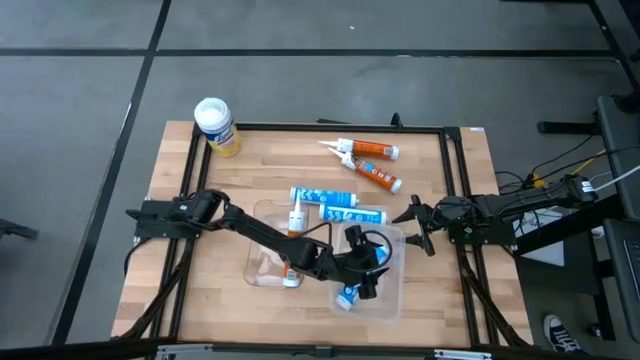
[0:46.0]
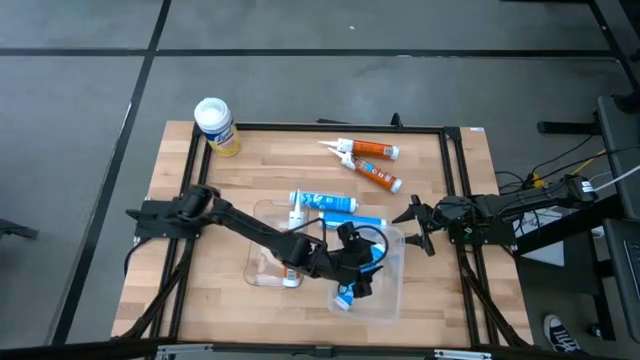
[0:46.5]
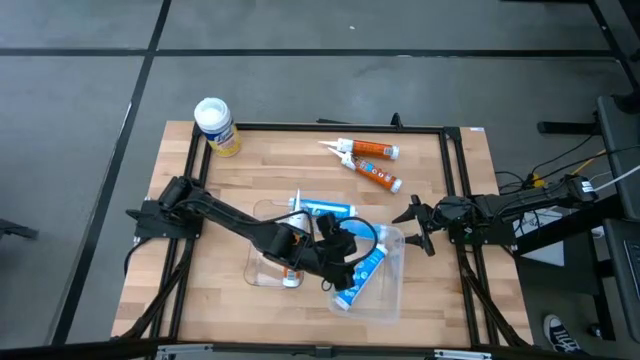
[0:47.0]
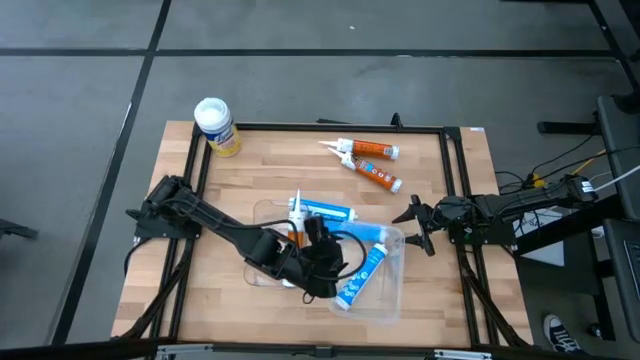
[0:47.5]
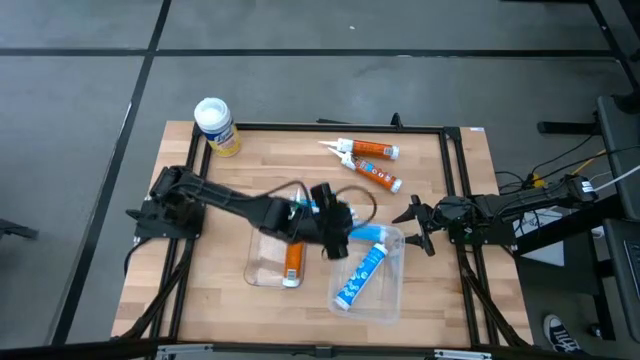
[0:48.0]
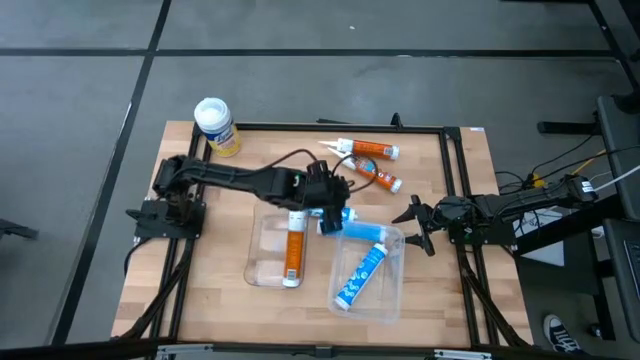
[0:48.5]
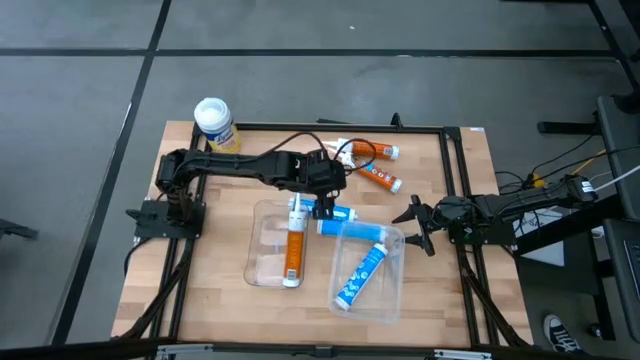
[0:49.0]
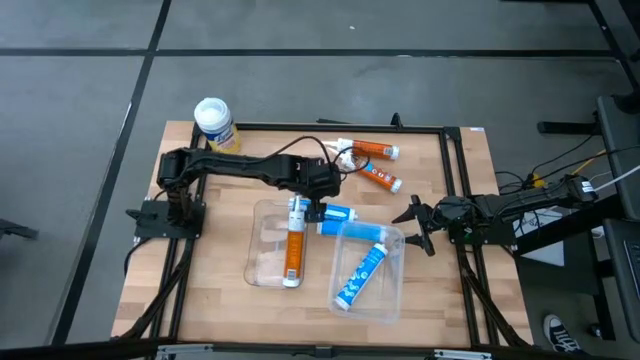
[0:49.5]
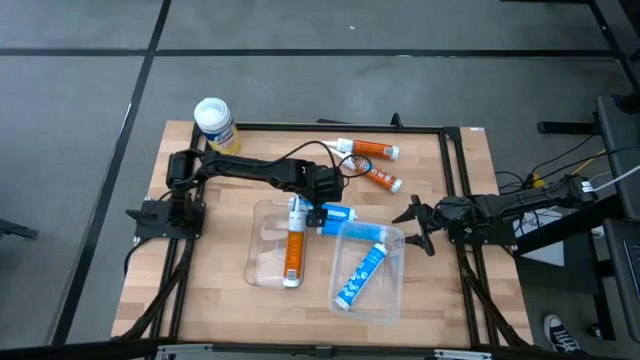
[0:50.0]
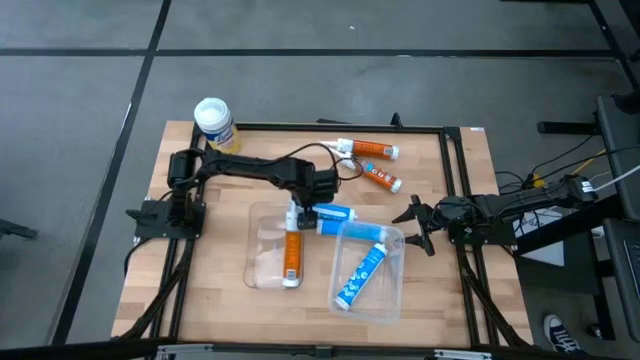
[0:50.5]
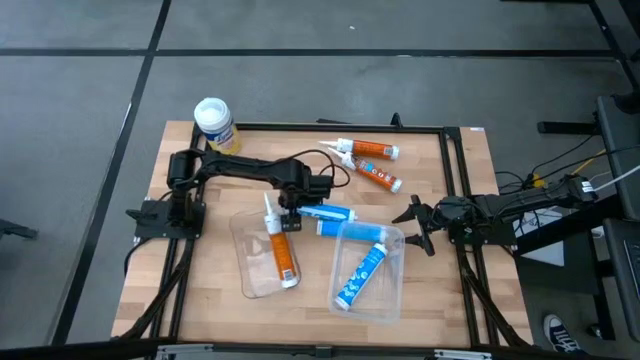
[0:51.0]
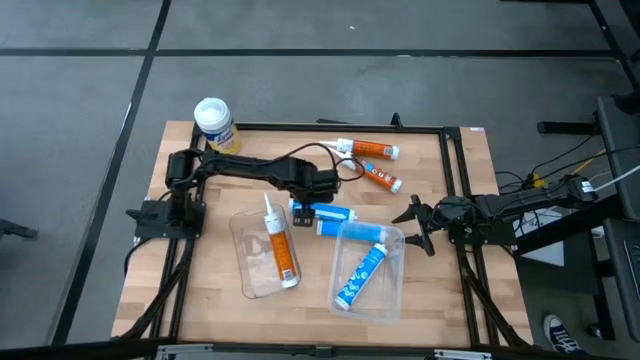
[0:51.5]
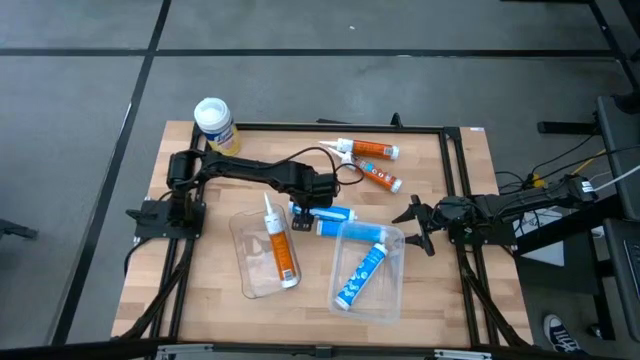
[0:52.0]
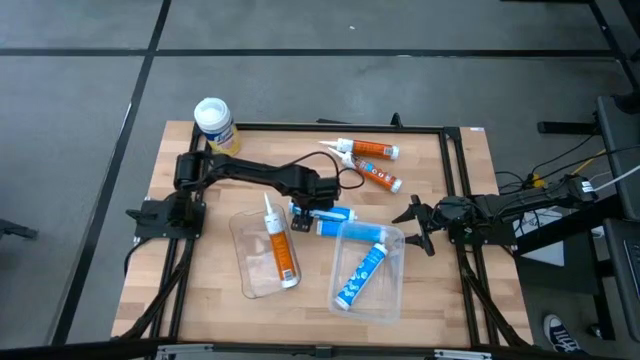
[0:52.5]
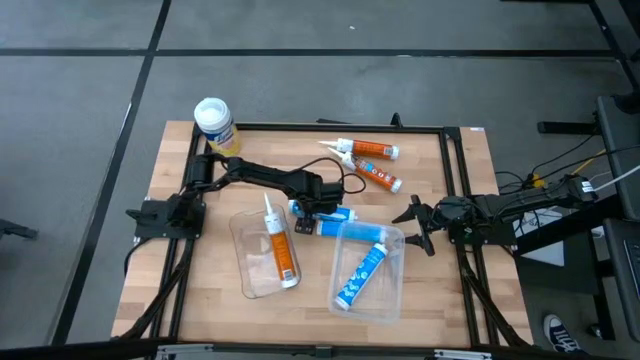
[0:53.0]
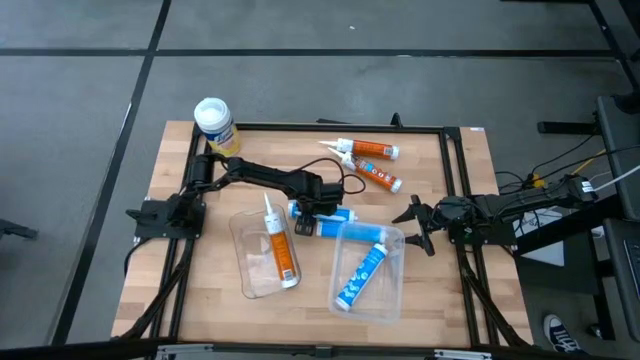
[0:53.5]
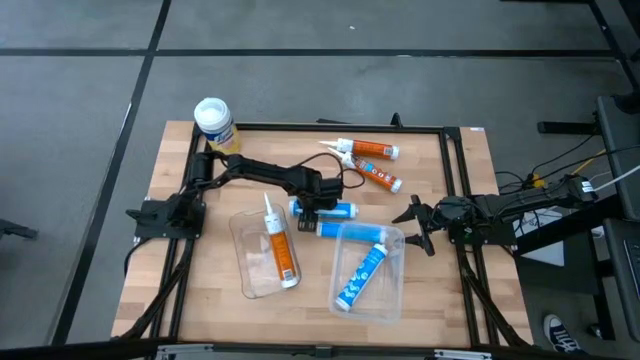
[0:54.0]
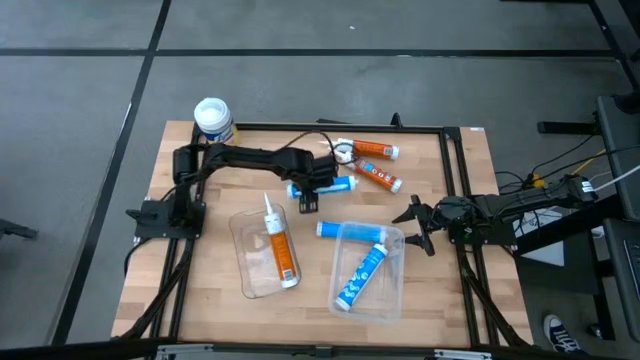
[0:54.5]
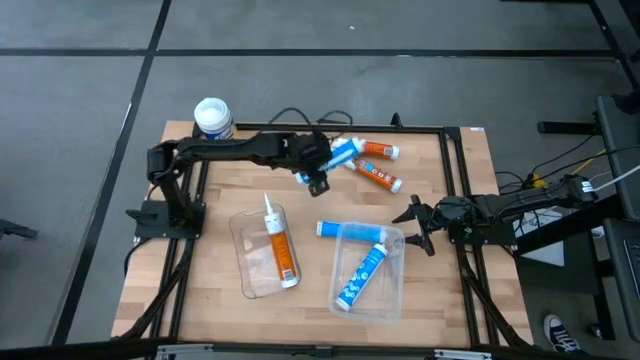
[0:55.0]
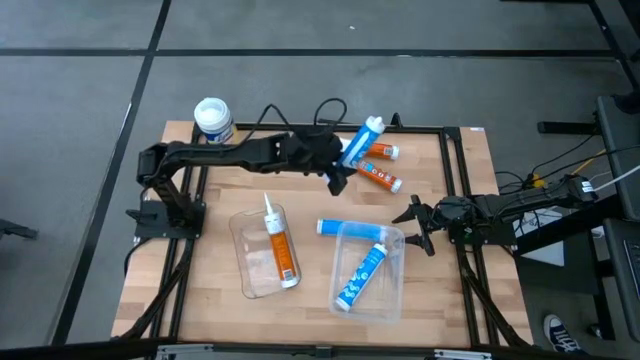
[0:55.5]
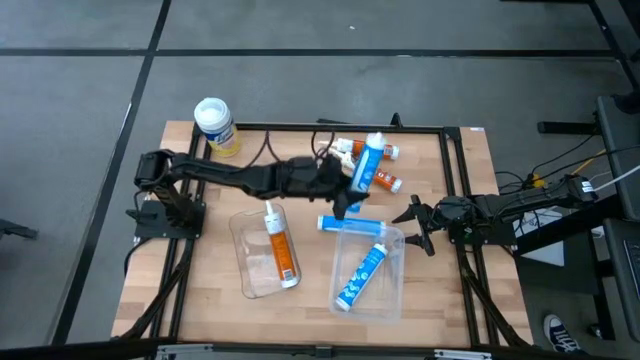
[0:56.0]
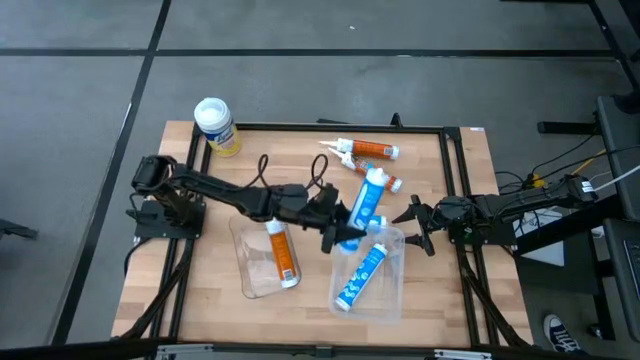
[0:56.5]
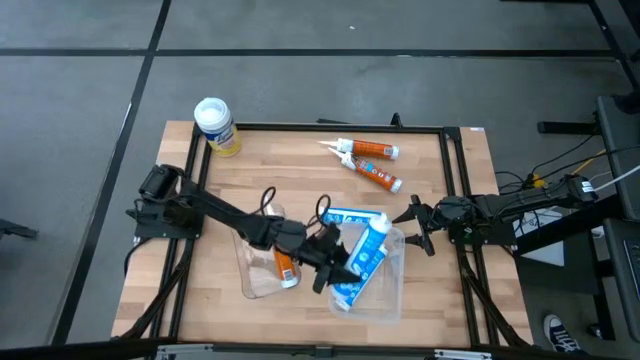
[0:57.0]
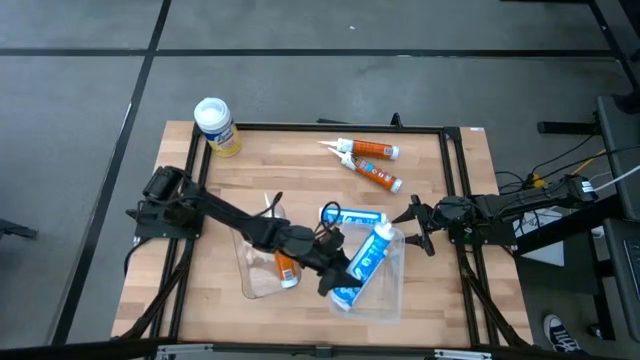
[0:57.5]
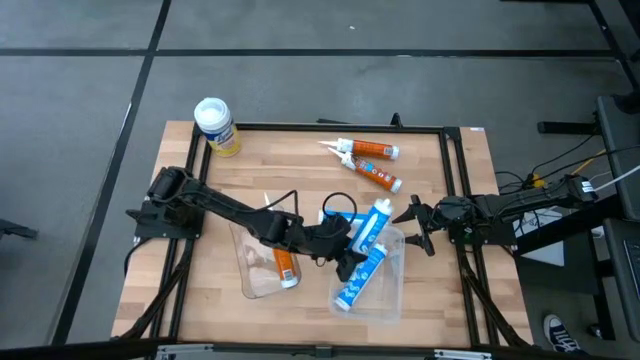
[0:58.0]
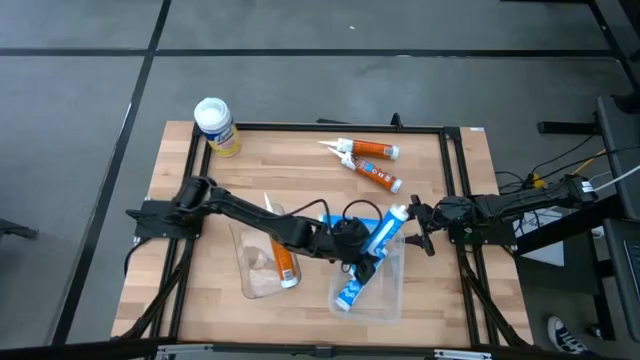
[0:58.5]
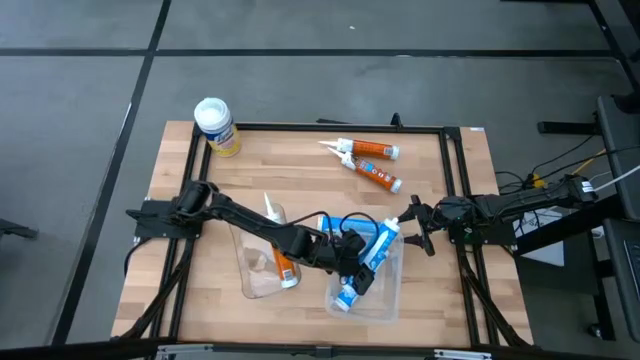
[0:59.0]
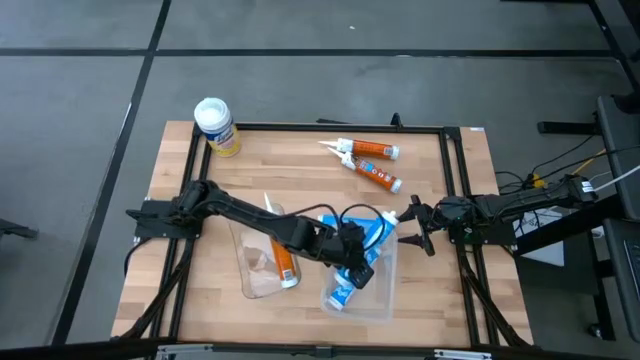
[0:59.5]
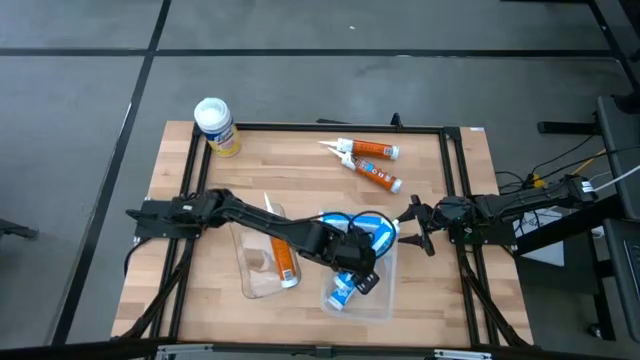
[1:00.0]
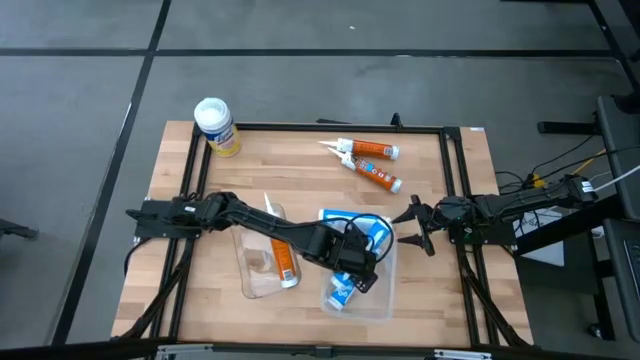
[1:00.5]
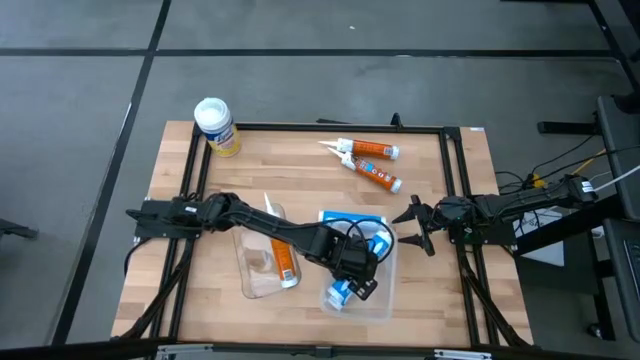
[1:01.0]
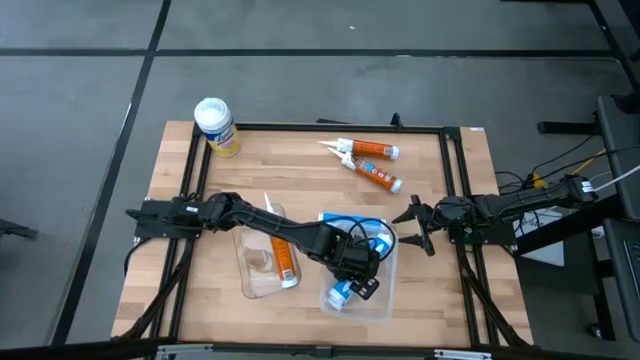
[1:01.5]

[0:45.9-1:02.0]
Task: Pick & place silicon tubes, Sealant and Lysol wipes
Put the top blue sealant into the right transparent bin

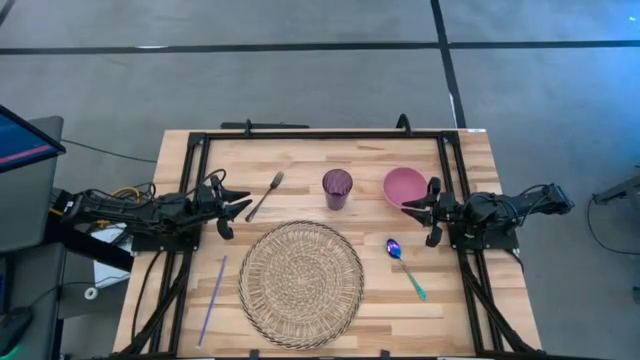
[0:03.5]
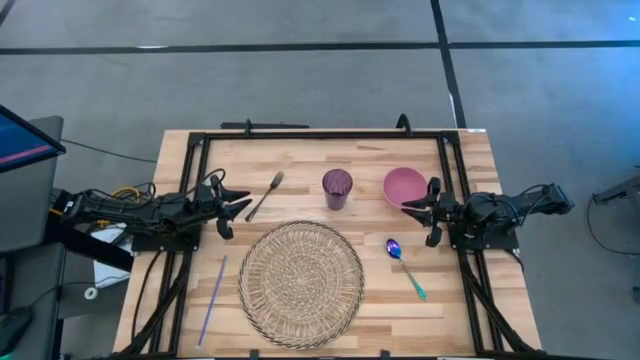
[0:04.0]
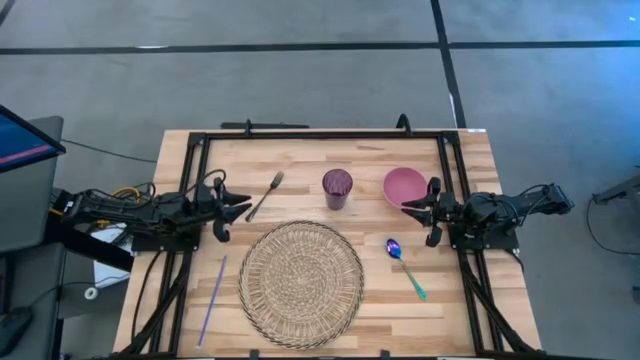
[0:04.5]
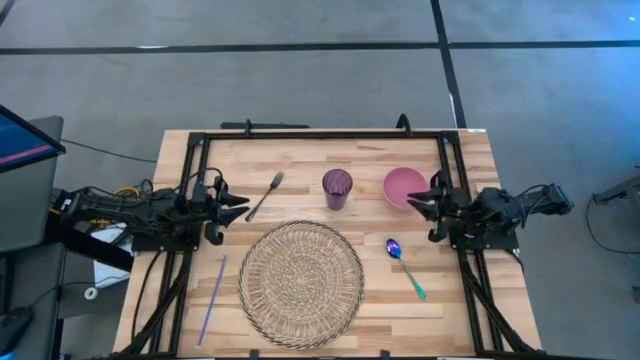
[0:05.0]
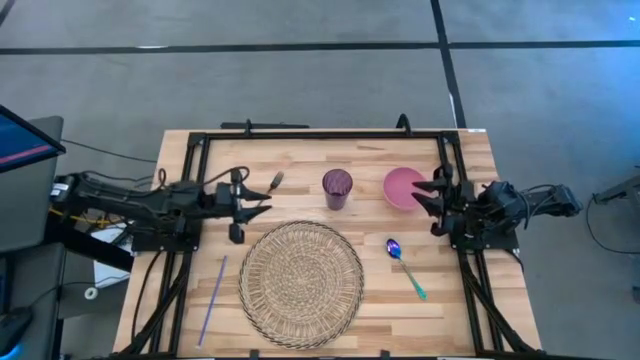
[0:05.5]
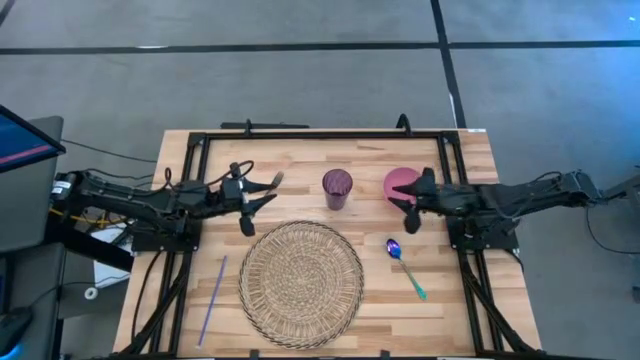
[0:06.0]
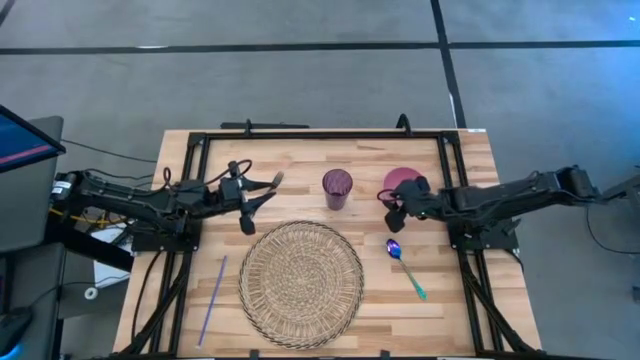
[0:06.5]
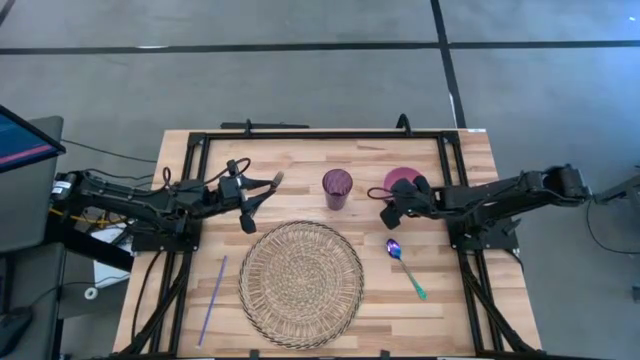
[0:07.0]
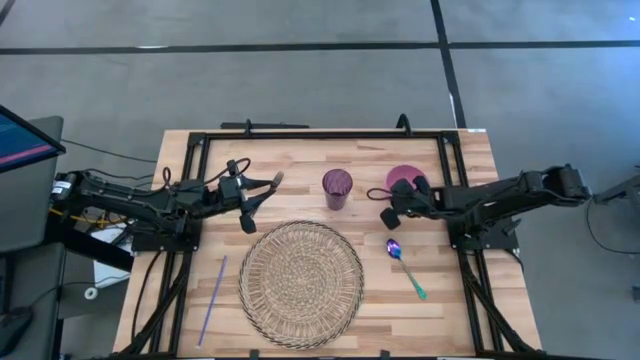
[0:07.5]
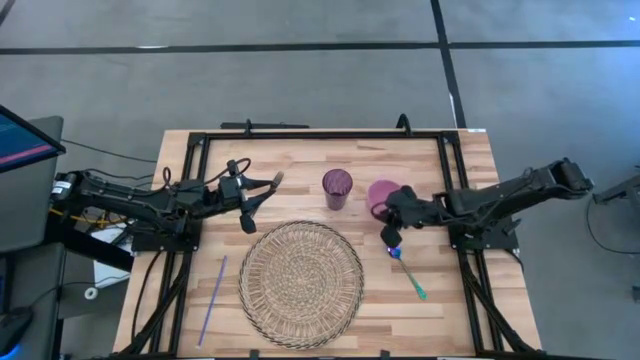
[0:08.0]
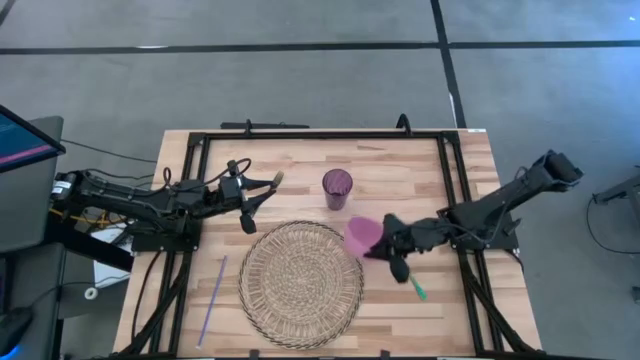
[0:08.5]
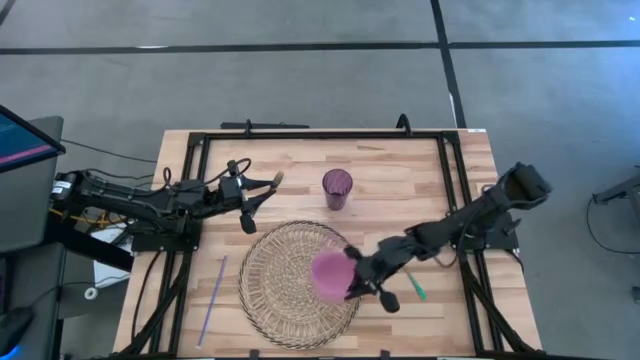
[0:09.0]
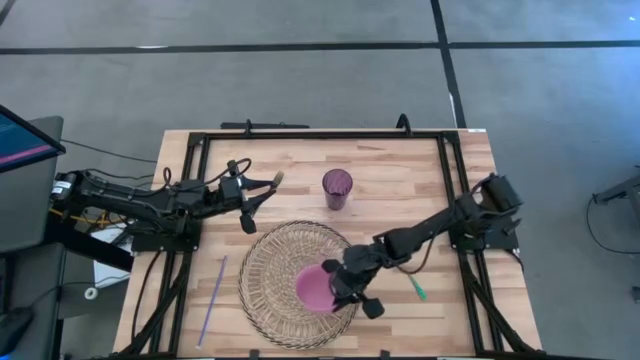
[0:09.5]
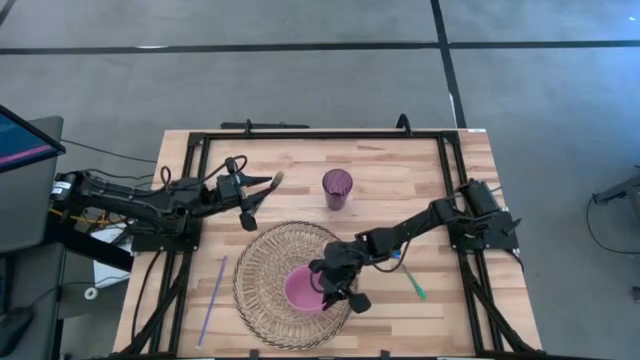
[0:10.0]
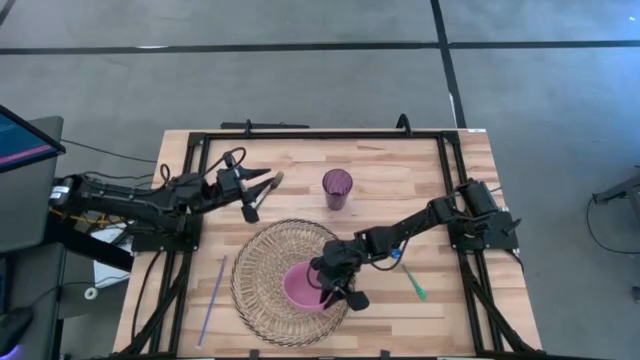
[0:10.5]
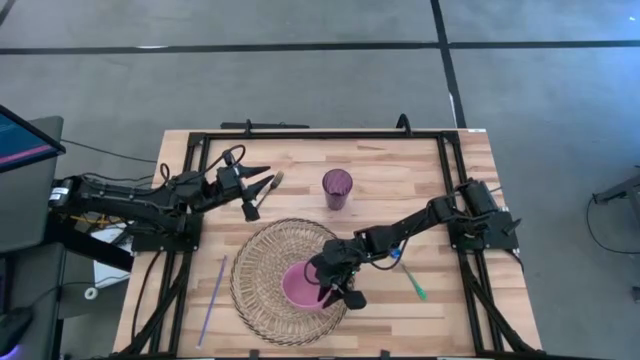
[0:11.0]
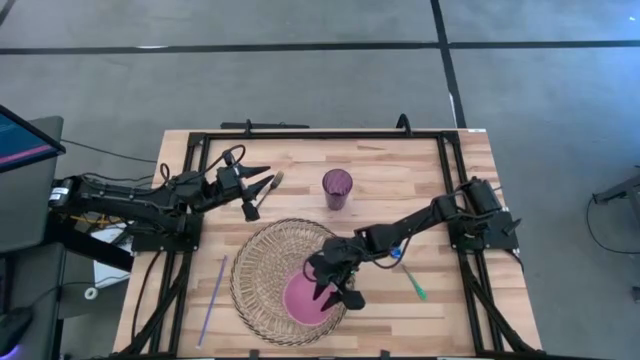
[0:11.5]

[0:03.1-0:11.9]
Task: Pick & Place Utensil
Put the pink bowl on the brown mat
